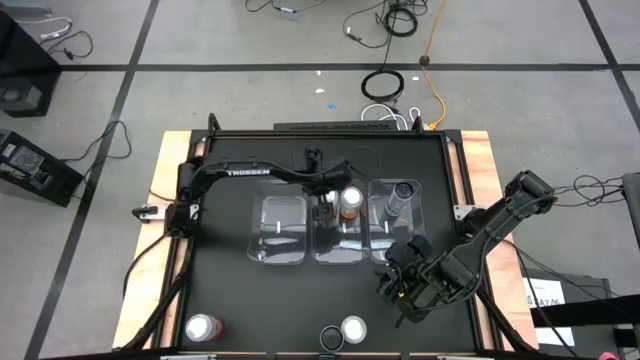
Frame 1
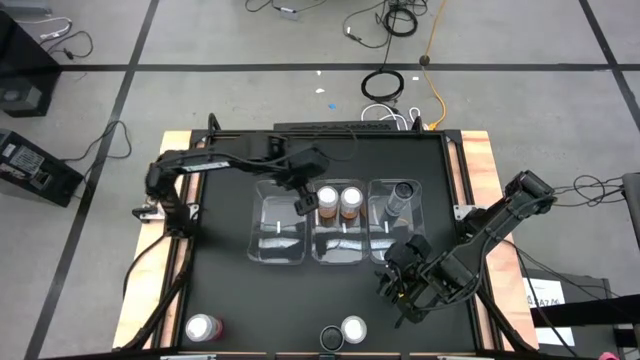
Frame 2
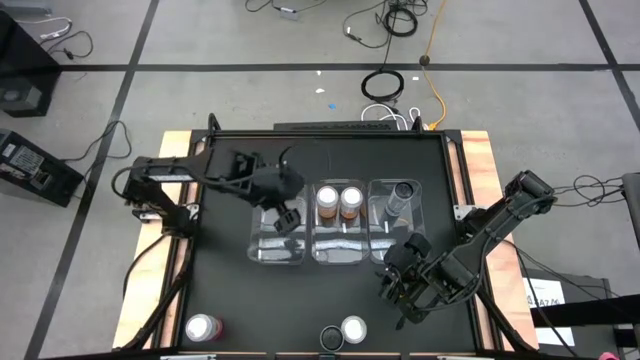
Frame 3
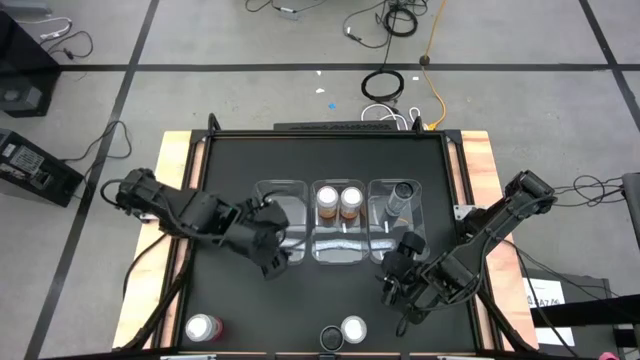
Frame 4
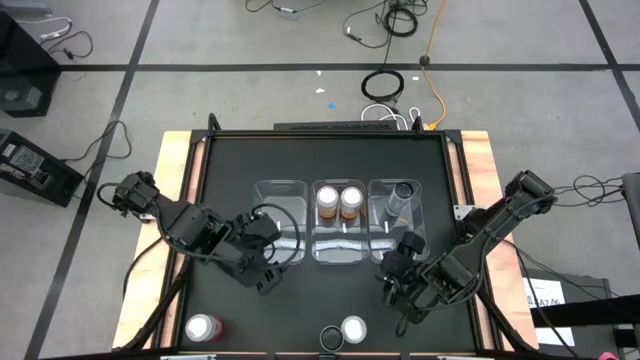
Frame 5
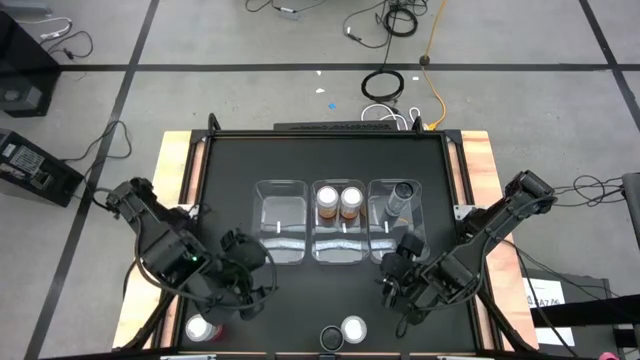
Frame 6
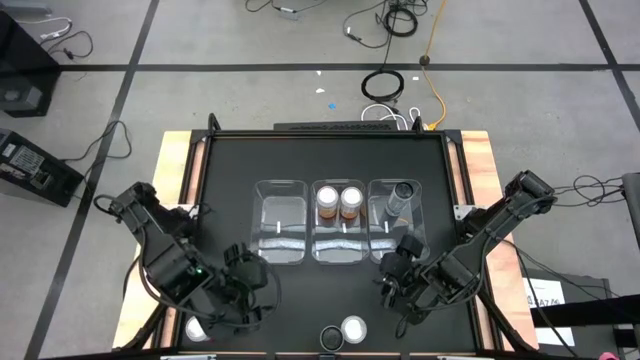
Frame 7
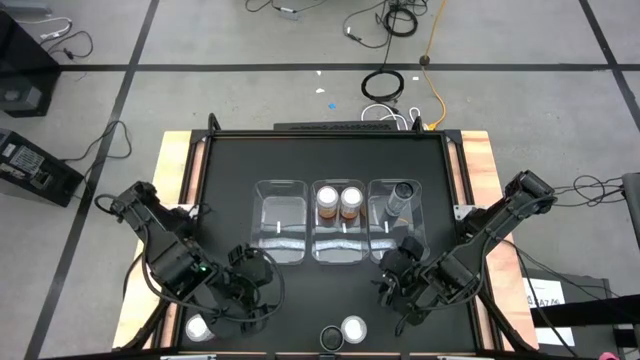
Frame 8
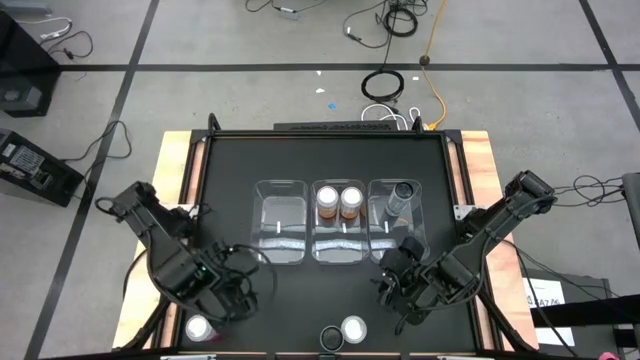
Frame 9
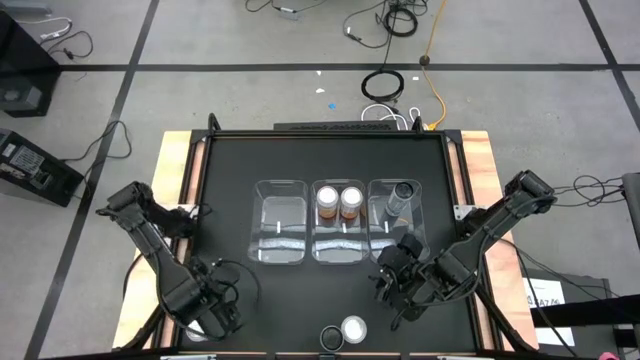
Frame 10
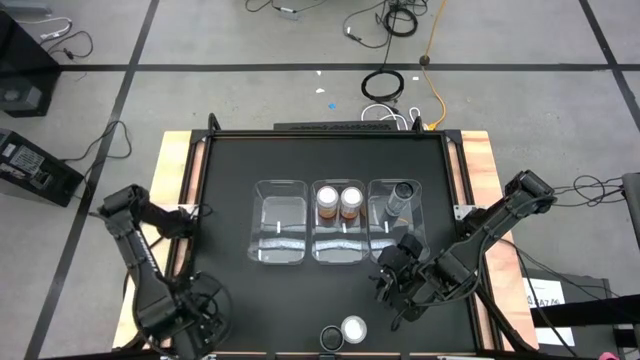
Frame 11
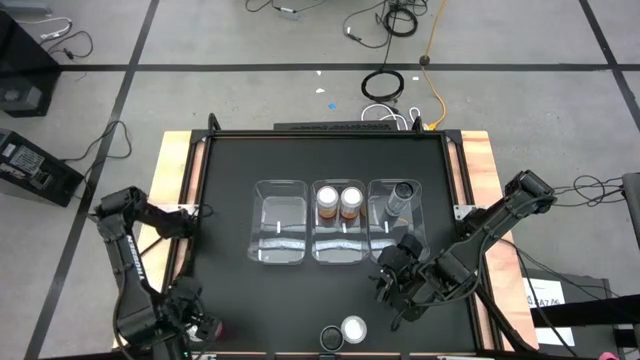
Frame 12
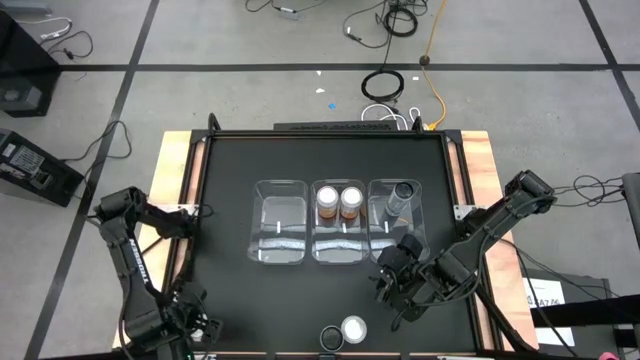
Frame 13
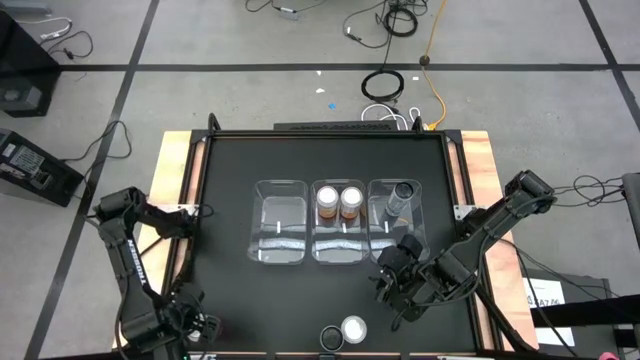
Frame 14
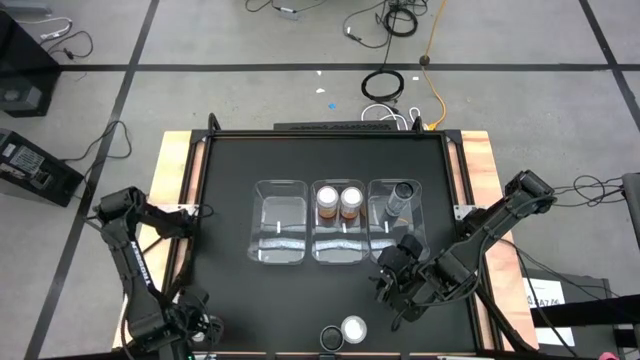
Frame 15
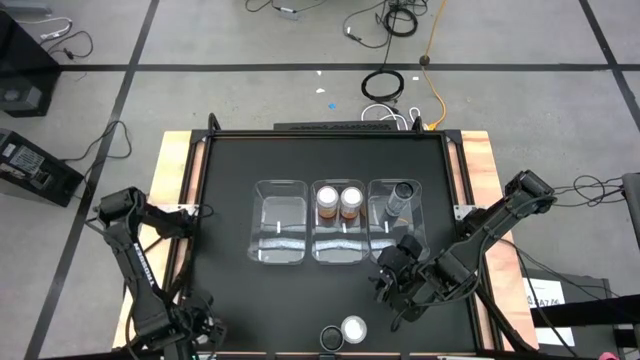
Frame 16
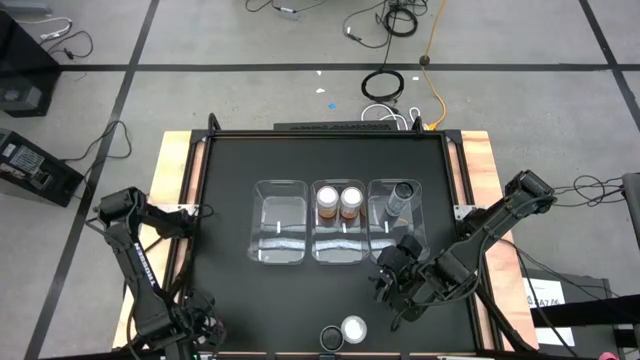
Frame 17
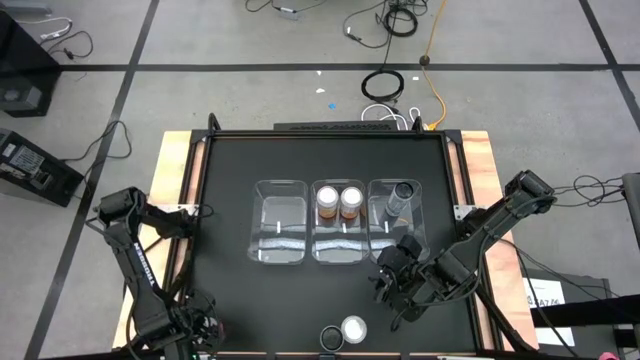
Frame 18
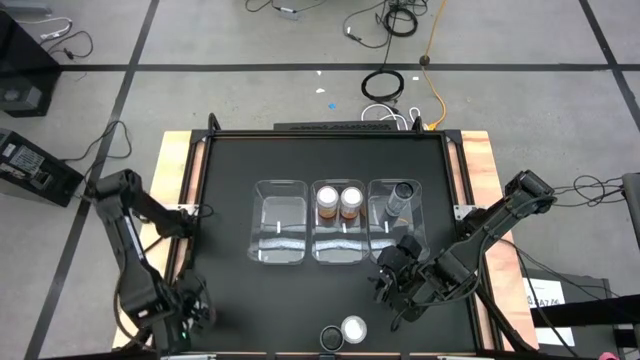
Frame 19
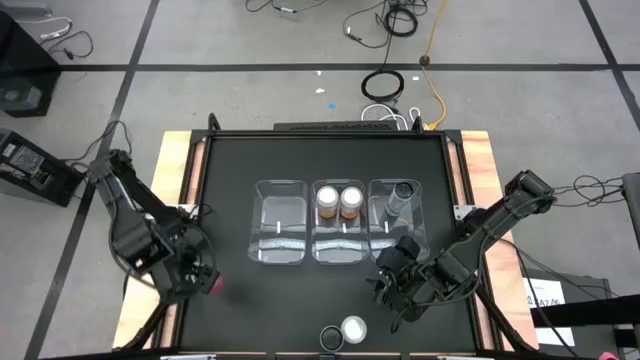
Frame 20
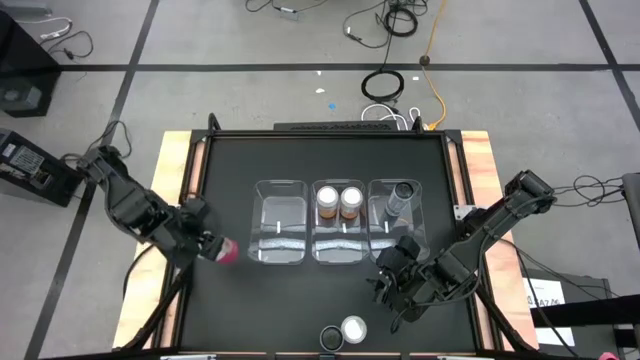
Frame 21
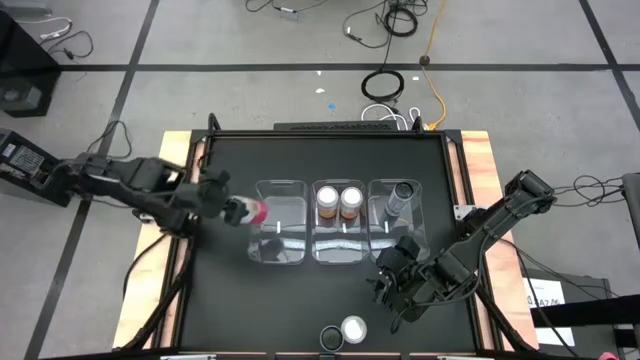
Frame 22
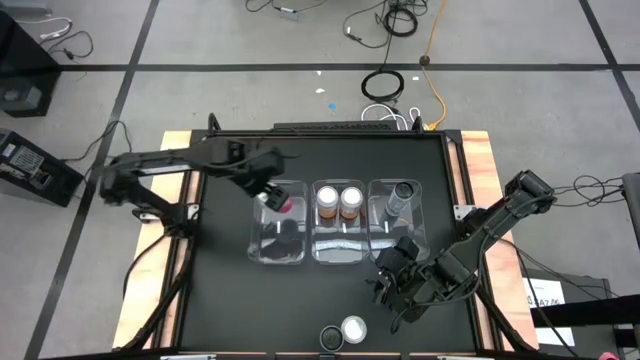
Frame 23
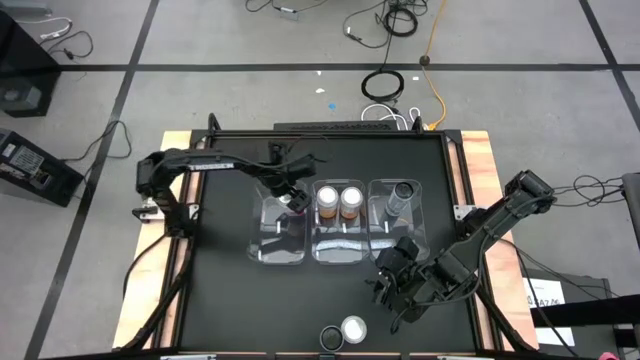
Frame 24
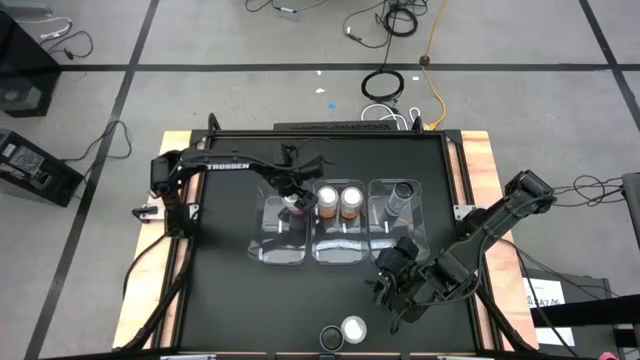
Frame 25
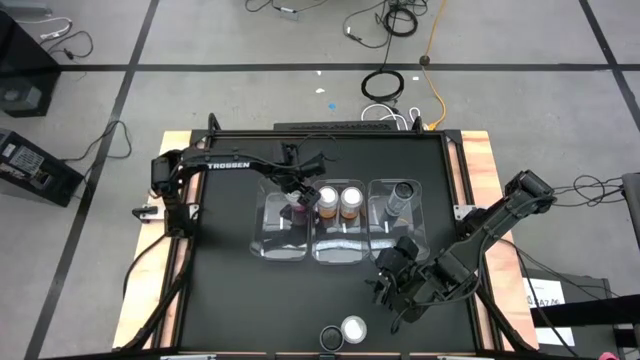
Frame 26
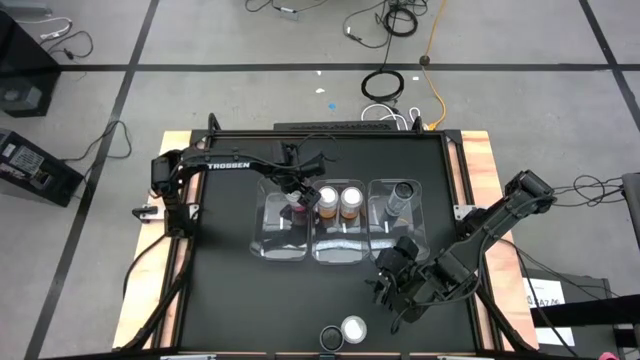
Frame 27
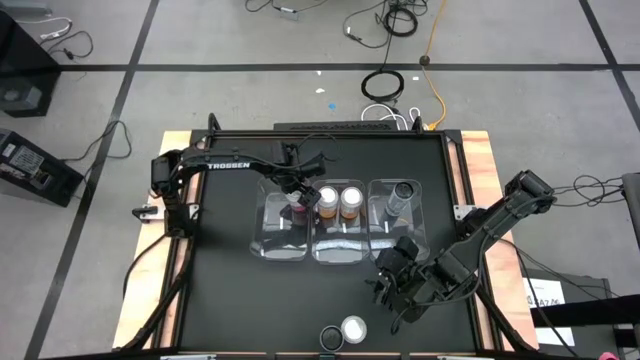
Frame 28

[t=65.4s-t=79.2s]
Task: Sort soda cans
Put the left pink white soda can into the left transparent bin

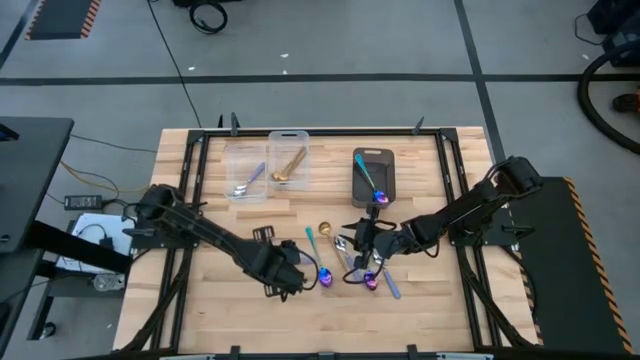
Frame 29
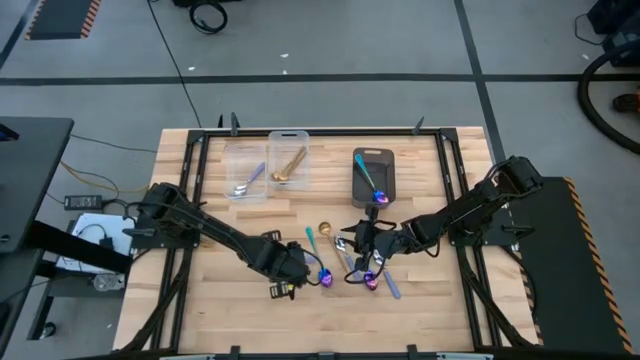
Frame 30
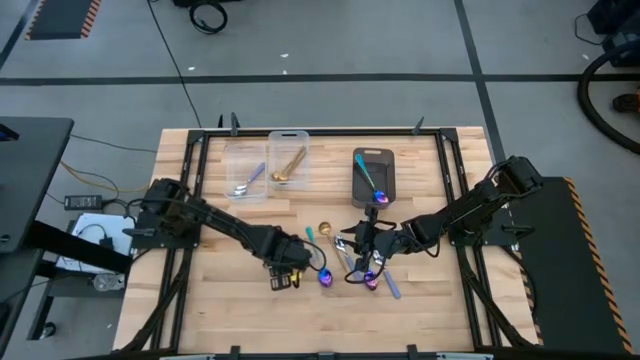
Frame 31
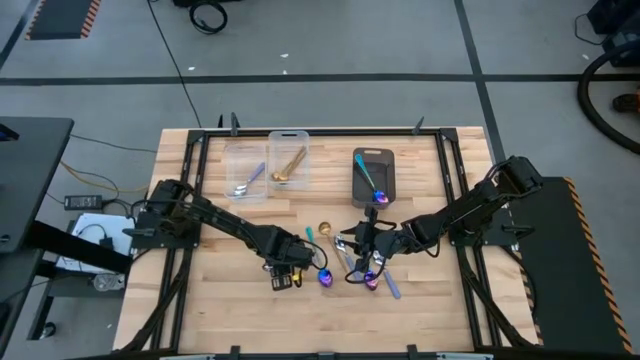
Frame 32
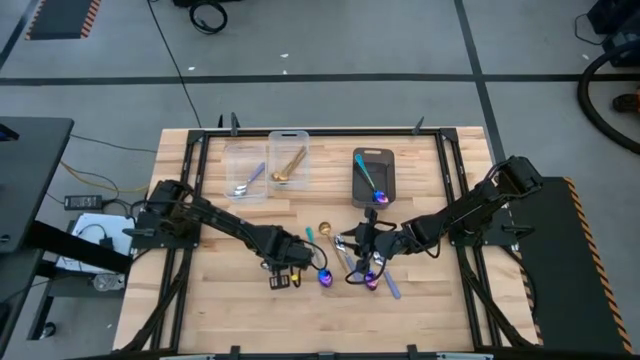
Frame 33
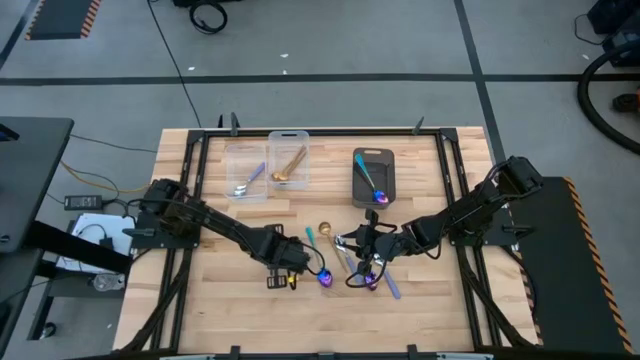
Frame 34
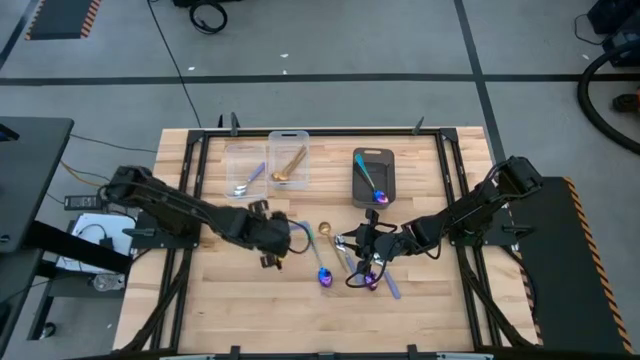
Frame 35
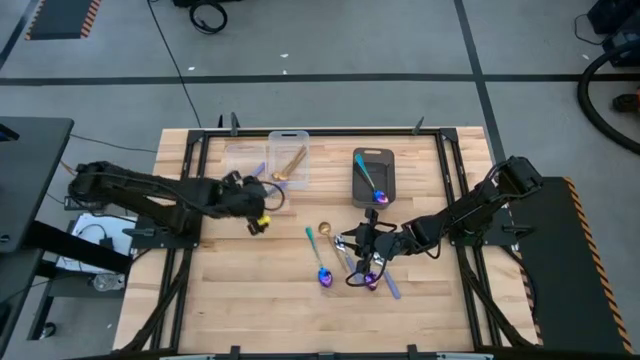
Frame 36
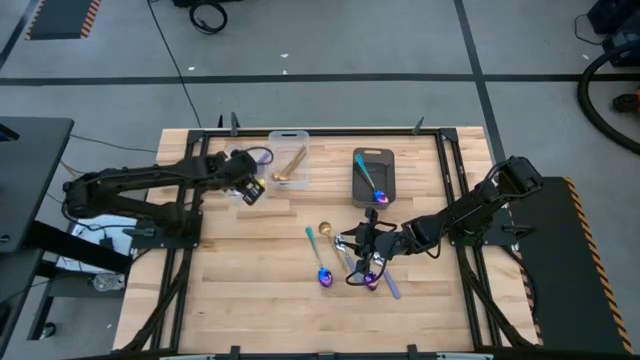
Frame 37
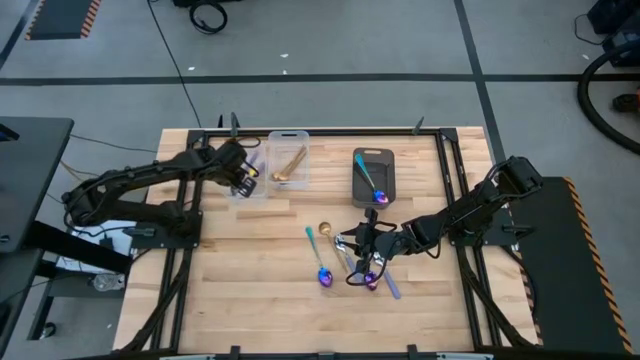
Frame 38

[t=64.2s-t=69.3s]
Task: Sort silverware by color (type)
Put the purple spoon into the left transparent bin
